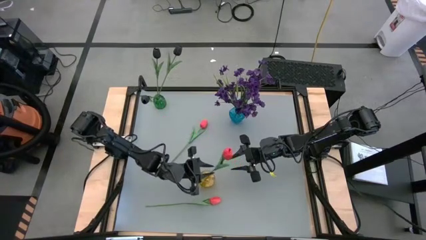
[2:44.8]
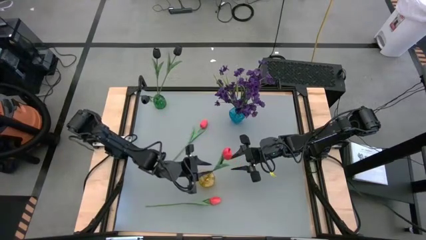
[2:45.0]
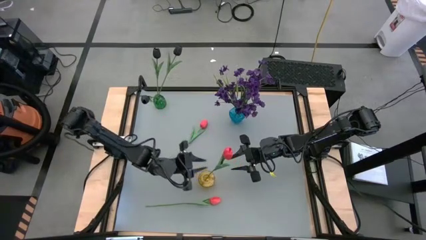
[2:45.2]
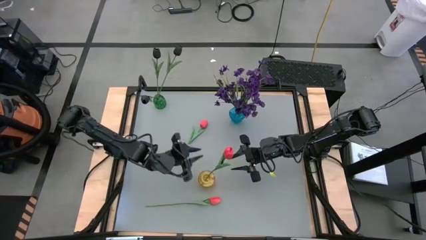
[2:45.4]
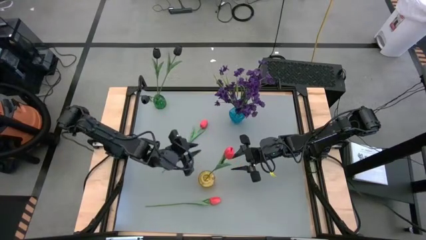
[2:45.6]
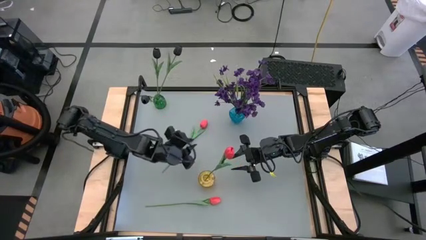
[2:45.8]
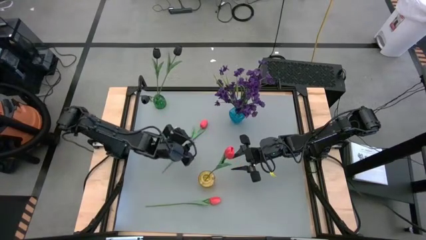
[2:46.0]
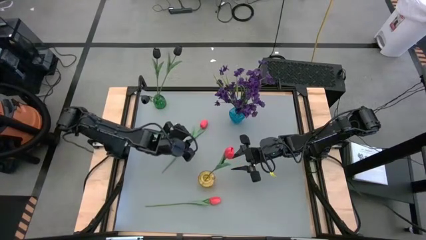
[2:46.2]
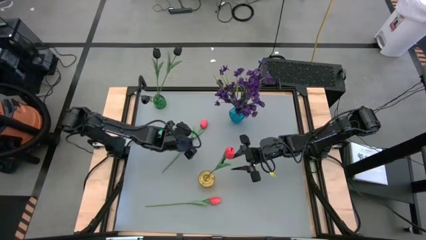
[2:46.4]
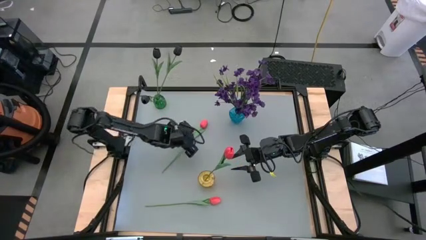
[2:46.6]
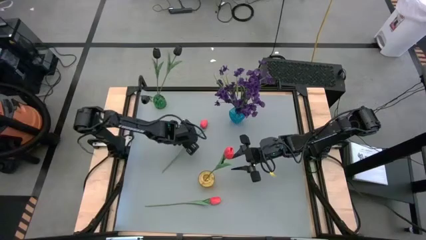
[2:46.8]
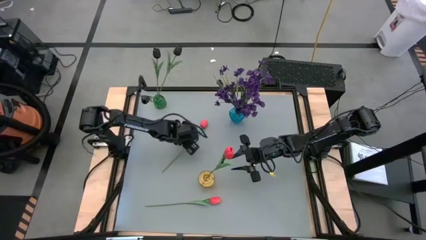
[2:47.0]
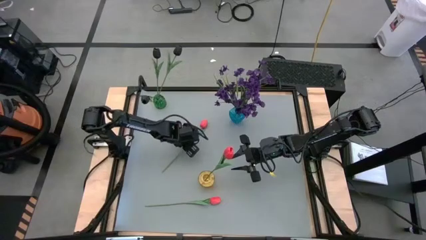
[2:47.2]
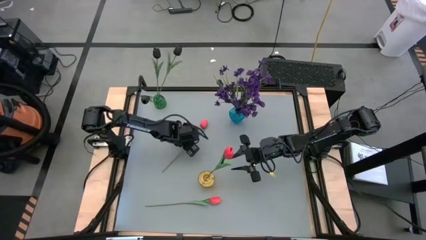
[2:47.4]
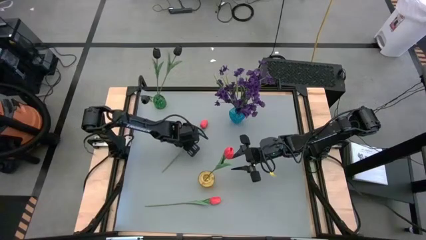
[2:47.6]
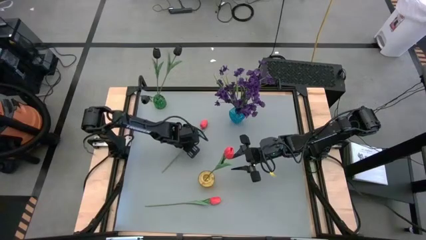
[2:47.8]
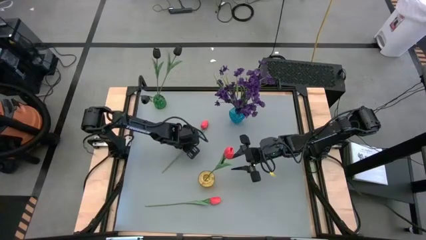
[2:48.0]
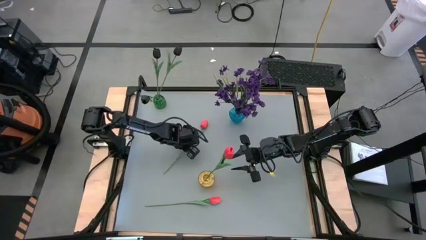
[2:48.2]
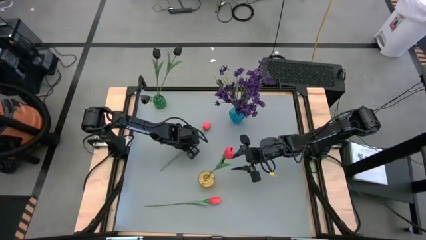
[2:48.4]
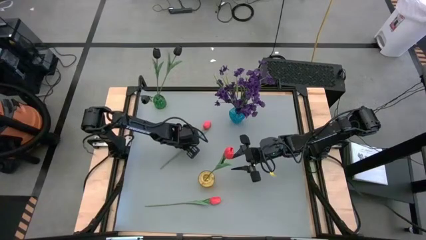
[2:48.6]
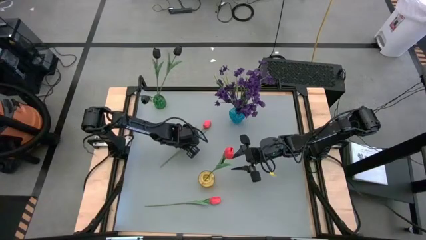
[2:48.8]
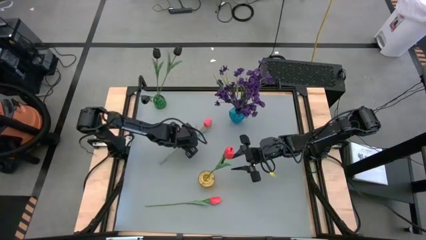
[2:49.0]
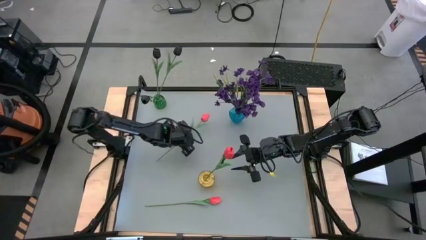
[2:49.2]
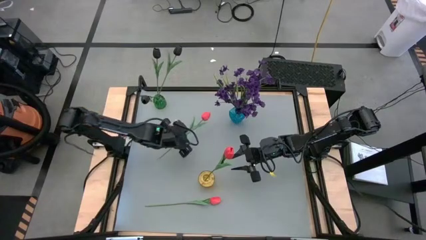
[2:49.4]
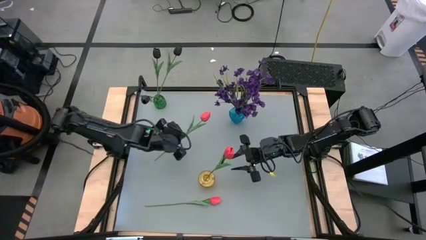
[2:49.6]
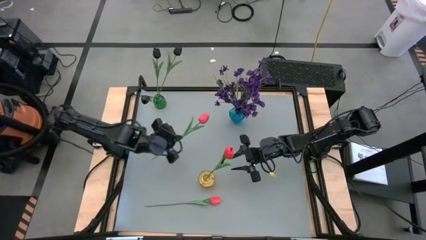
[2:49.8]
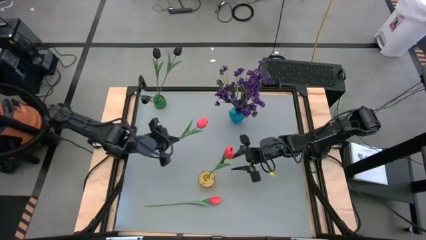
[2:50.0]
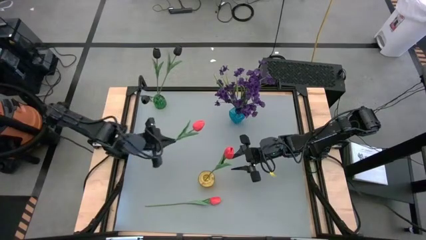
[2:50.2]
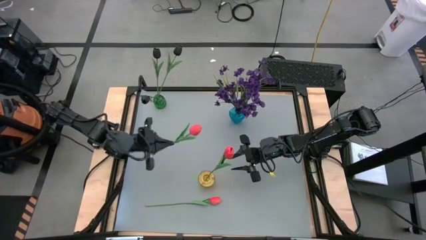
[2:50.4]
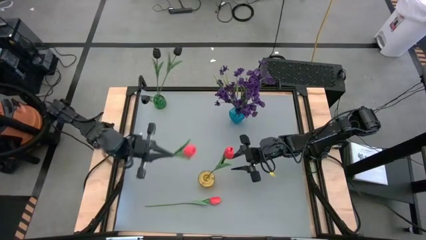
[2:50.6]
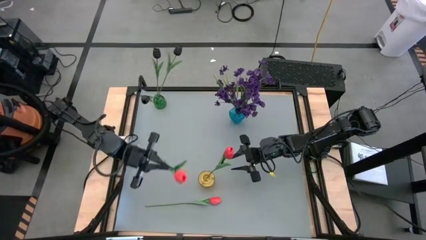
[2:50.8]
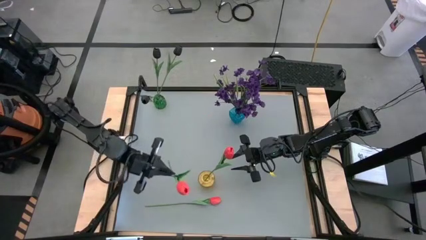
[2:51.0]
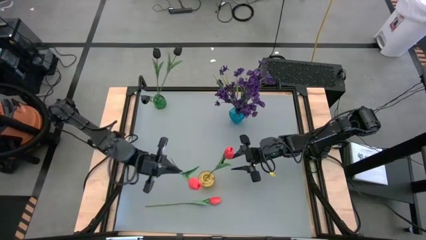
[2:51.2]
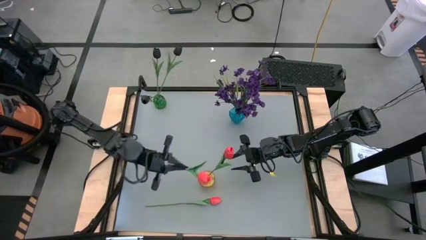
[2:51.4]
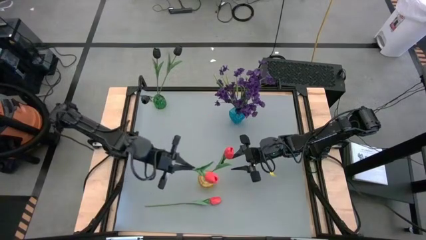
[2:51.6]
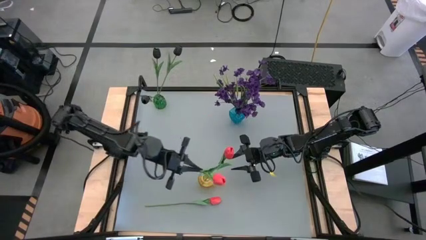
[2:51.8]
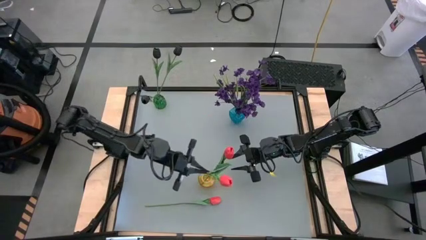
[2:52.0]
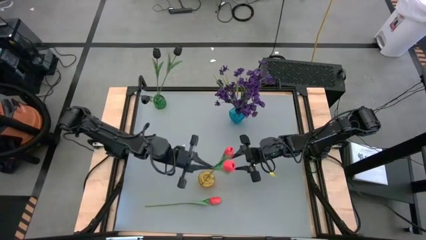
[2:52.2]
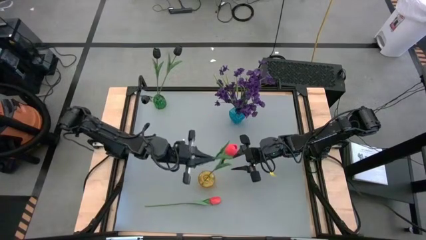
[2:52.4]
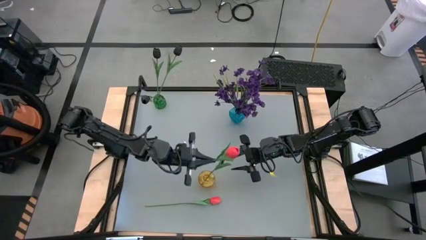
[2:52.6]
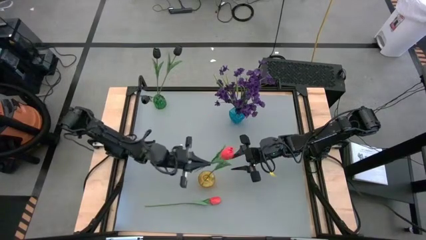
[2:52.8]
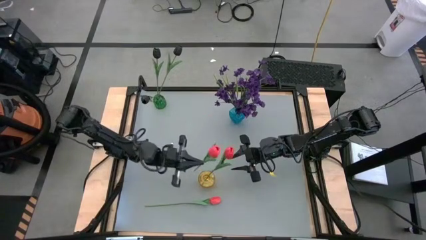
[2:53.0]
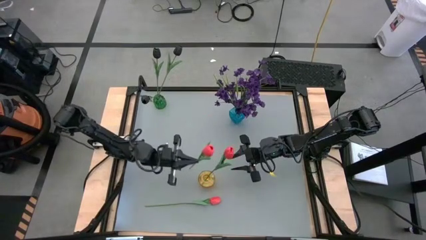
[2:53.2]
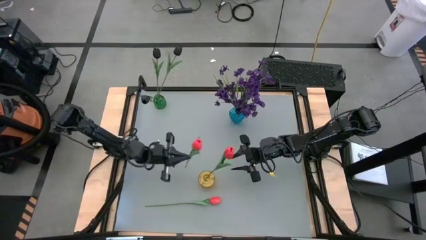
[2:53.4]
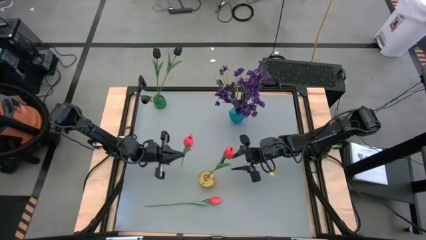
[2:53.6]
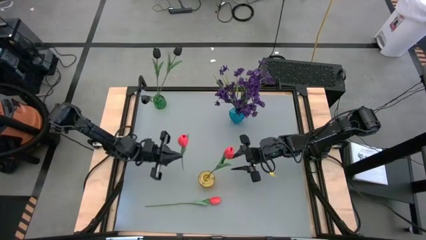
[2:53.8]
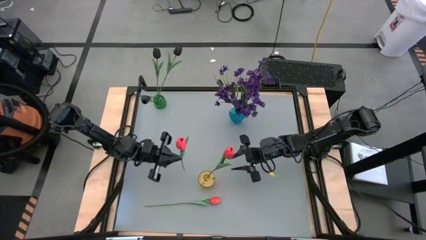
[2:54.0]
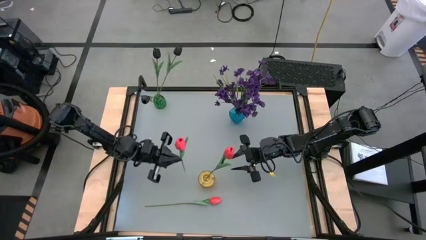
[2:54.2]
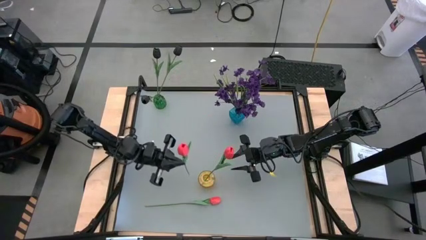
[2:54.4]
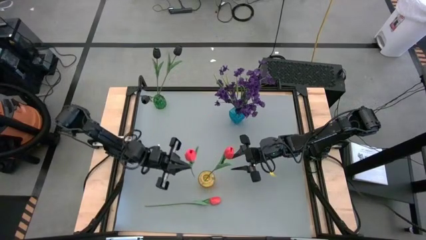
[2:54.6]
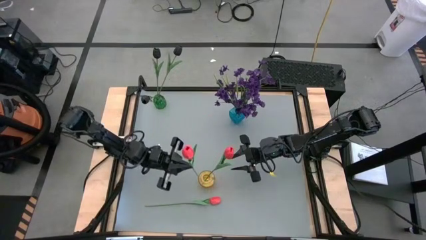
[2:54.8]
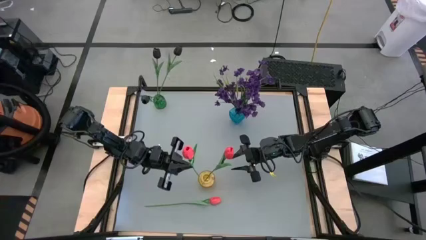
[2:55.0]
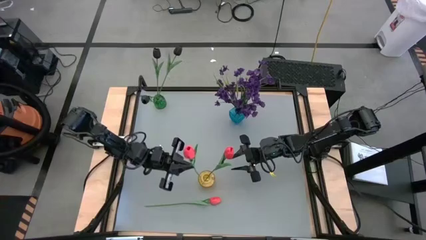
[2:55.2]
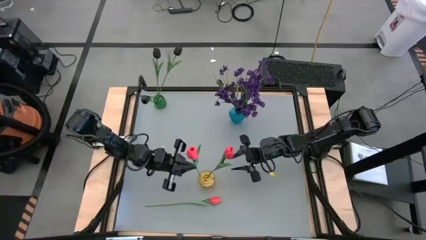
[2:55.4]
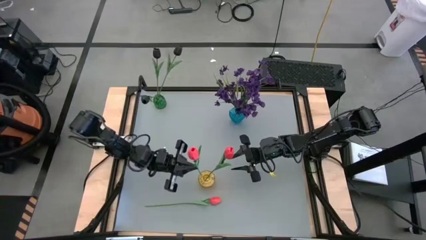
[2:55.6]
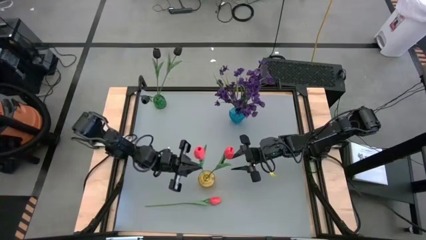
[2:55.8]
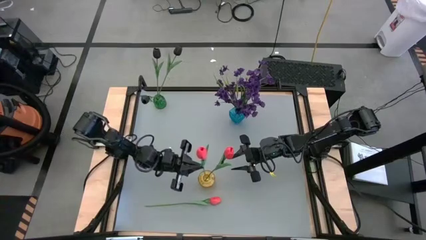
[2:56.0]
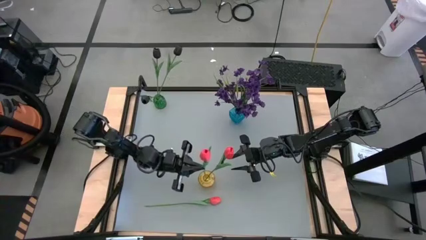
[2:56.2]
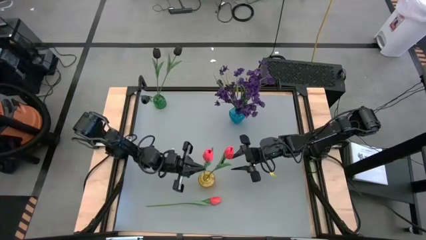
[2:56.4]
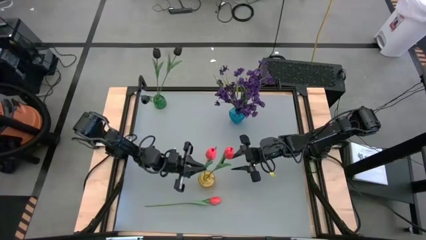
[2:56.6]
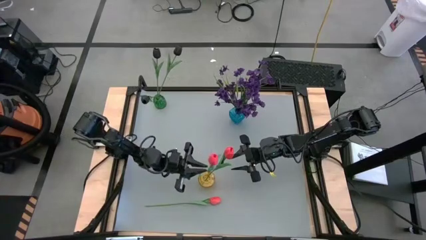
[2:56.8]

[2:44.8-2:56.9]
Task: Sort flowers into vase by color
Put the top pink flower into the yellow vase

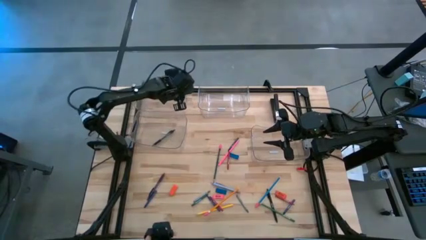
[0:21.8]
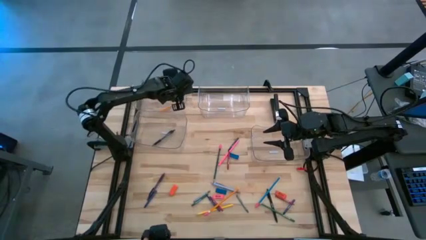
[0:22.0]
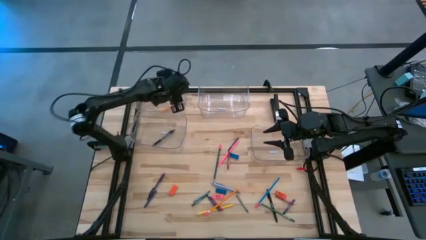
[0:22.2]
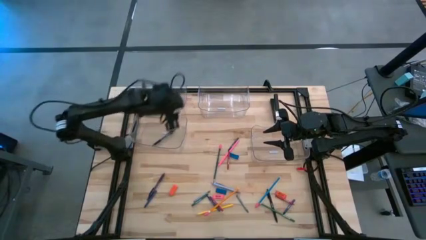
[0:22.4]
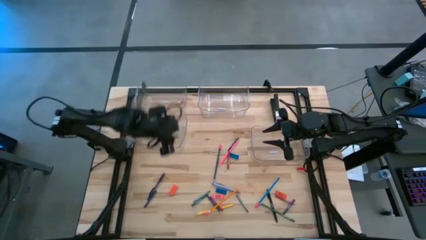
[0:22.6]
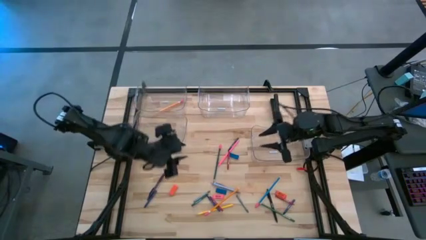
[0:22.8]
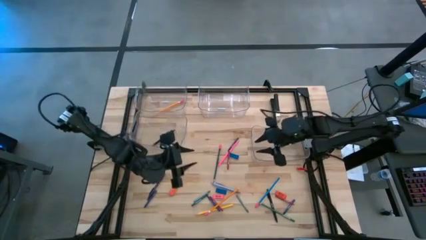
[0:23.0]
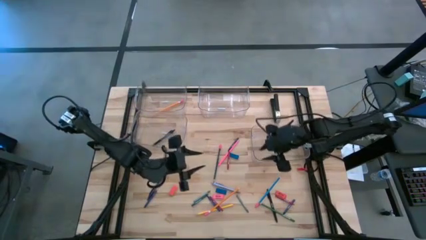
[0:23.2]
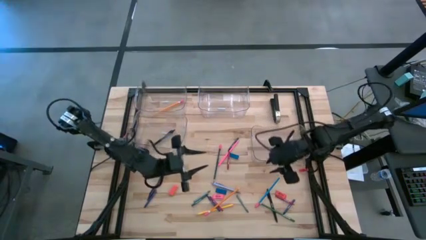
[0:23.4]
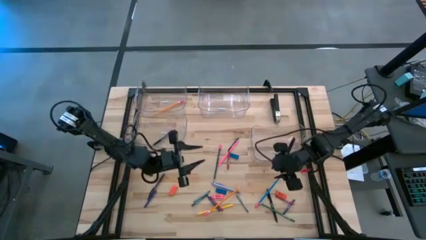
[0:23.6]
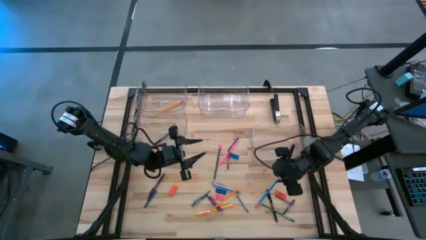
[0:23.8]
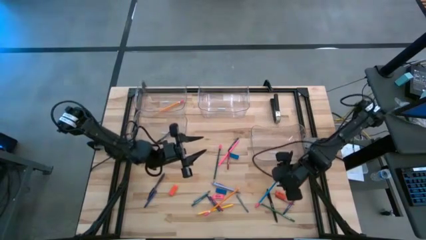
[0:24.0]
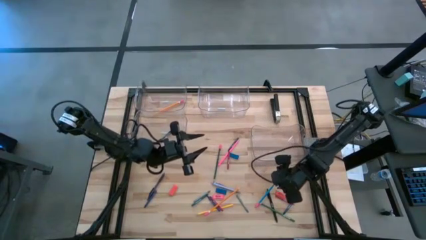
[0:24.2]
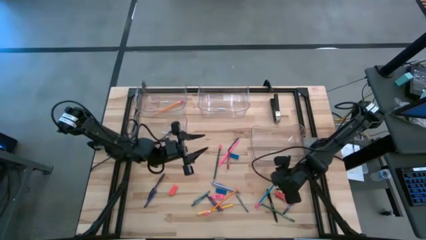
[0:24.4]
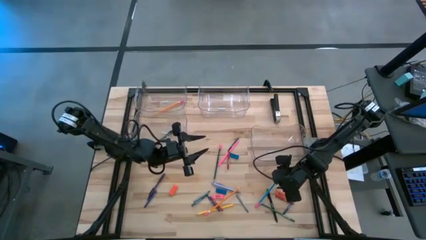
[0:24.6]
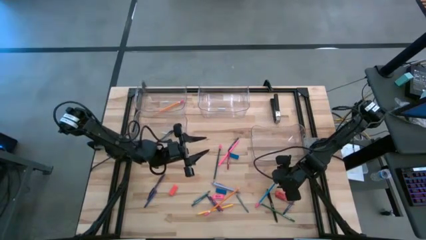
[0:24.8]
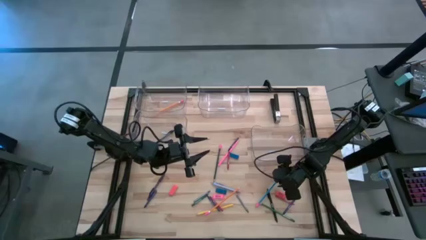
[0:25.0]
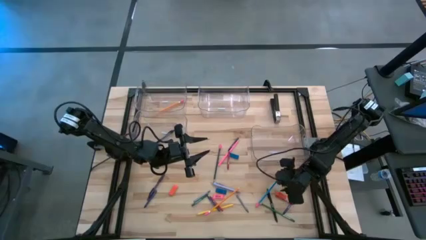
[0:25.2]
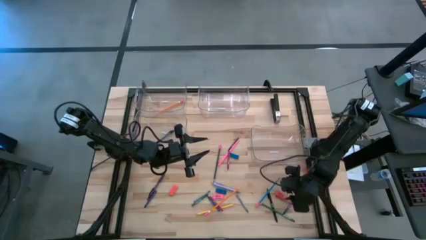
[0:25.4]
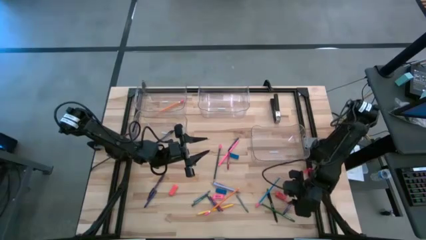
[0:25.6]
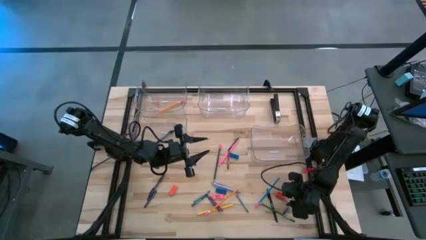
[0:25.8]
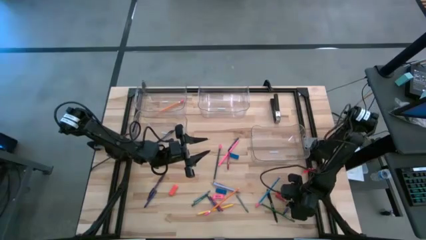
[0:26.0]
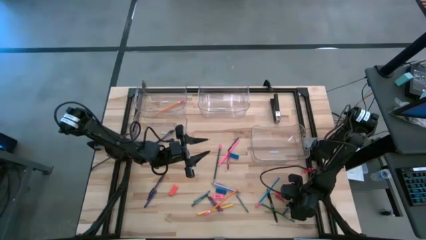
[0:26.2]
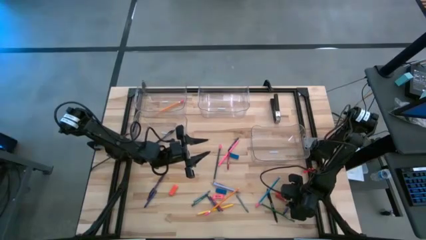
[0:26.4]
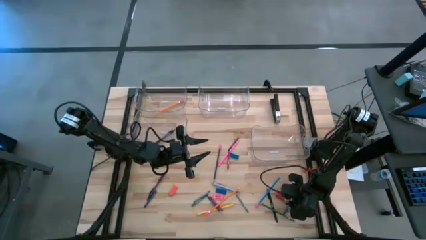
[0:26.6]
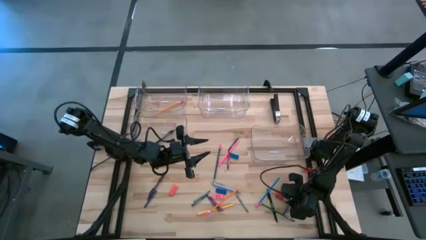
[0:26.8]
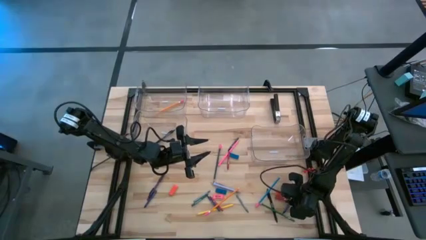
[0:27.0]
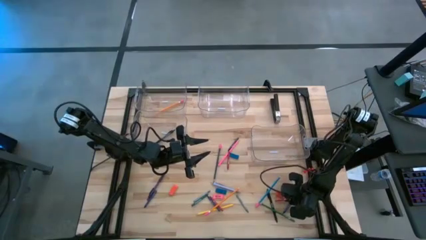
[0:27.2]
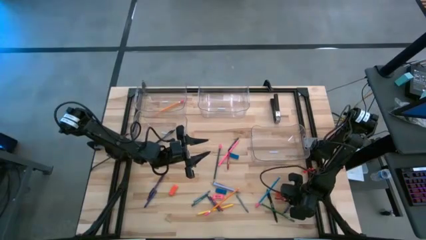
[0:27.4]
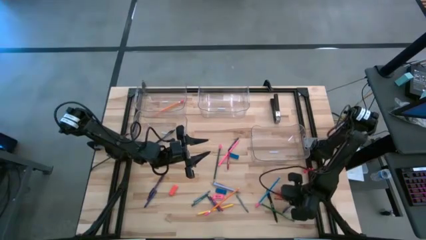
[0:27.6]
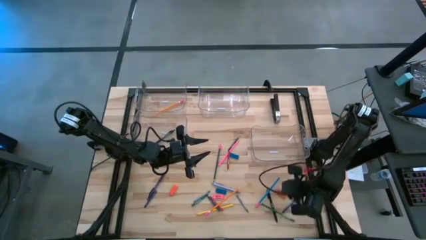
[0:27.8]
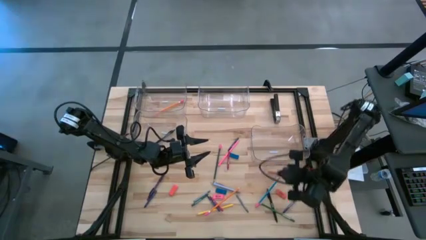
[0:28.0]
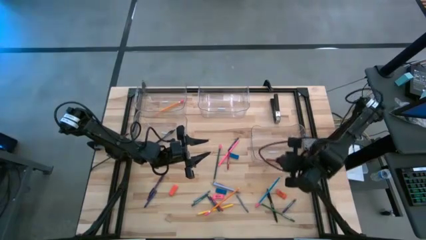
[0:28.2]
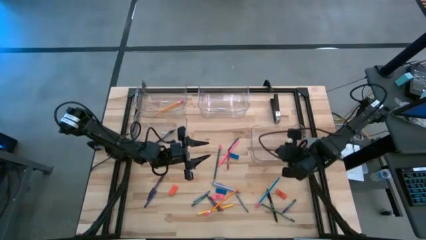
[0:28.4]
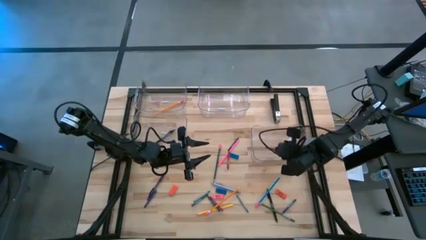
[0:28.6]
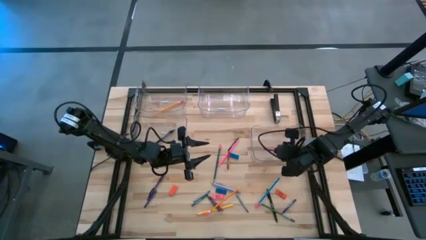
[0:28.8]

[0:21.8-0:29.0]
Task: Sort crayons/erasers/pens/pencils in bins
Put the red crayon into the bottom right transparent bin
